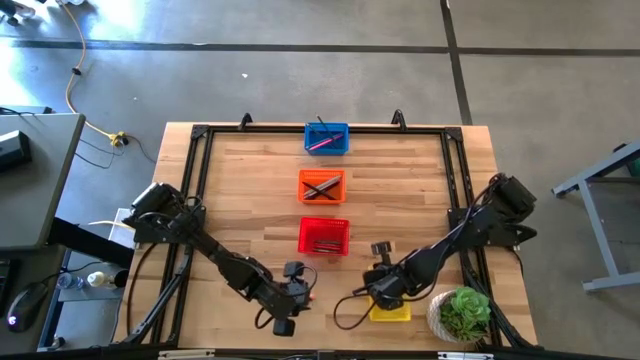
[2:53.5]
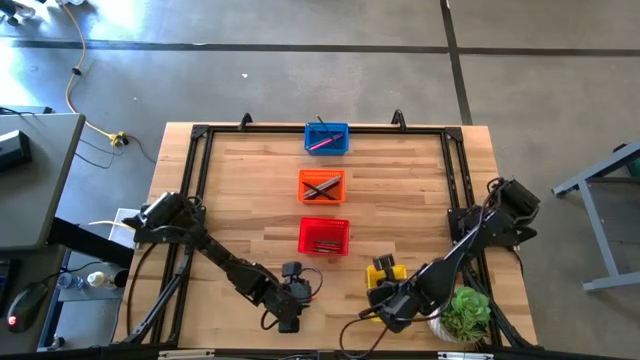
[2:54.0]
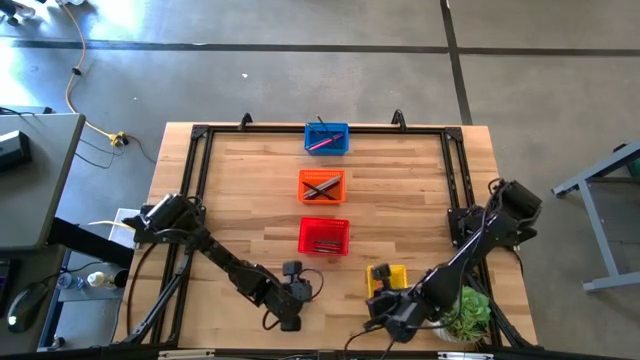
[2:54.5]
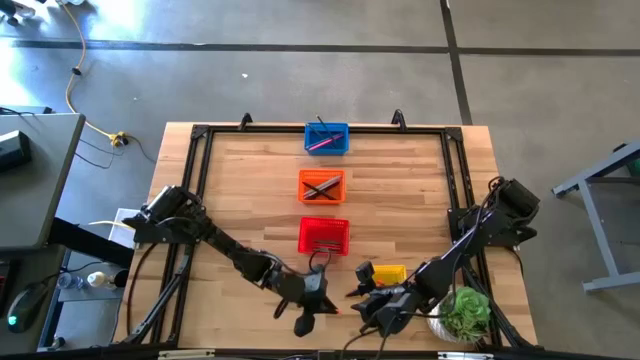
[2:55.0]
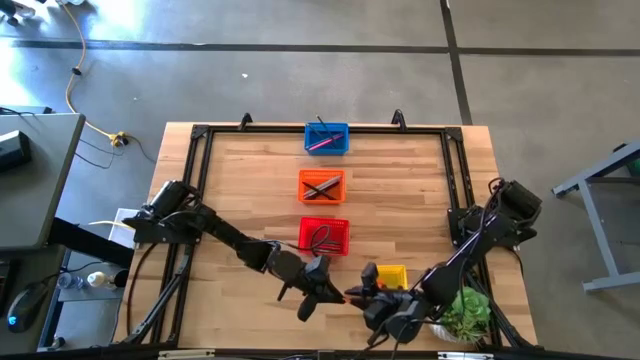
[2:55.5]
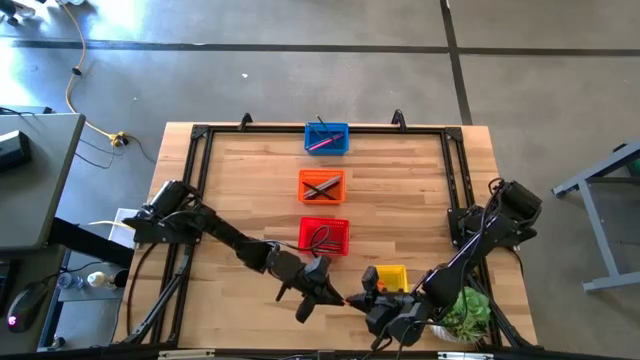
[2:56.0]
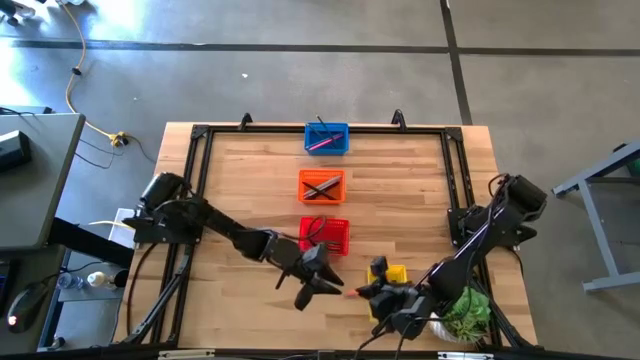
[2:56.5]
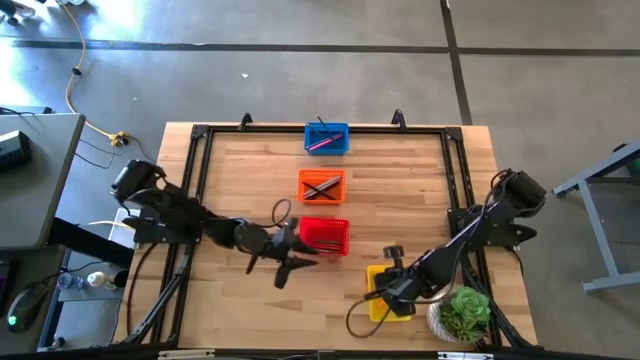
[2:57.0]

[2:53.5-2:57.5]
Task: Sort crayons/erasers/pens/pencils in bins
Put the orange eraser into the yellow bin

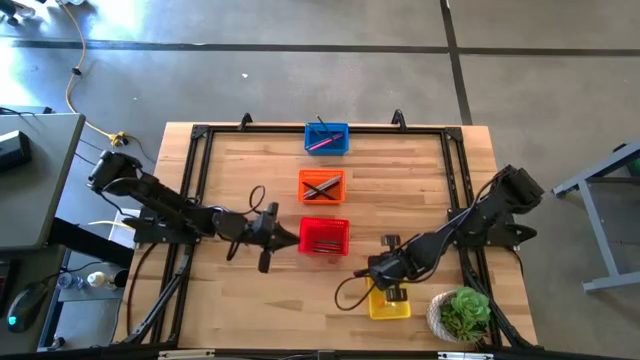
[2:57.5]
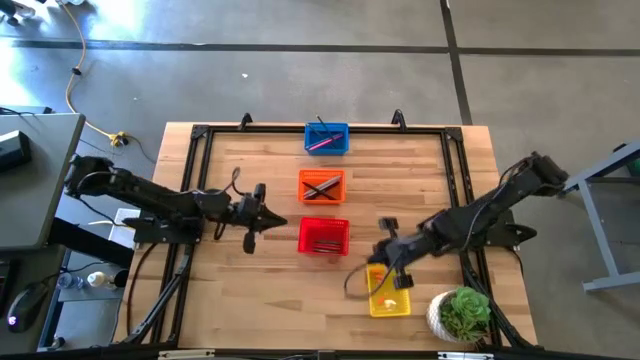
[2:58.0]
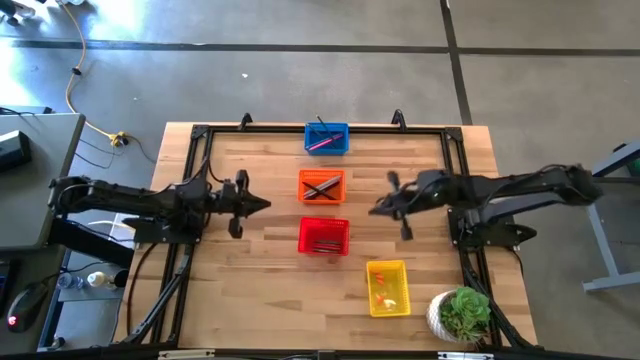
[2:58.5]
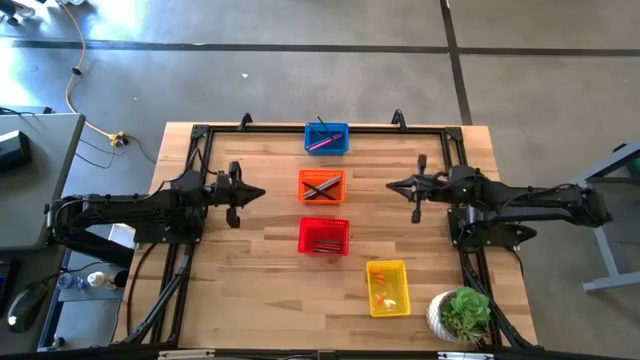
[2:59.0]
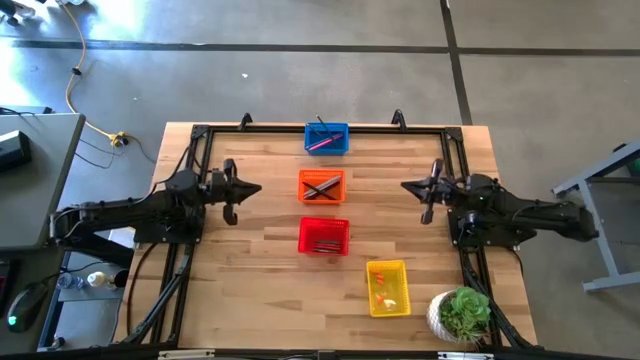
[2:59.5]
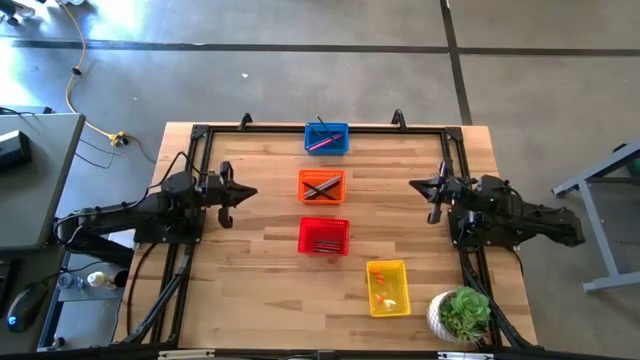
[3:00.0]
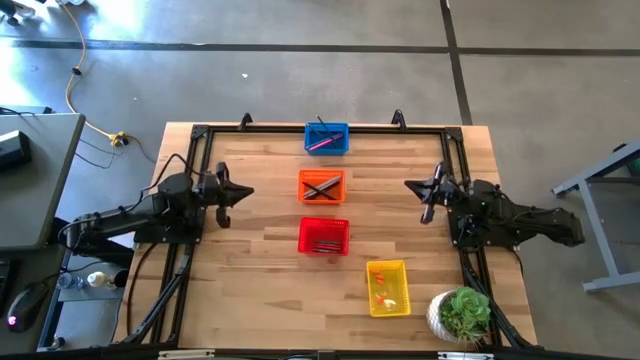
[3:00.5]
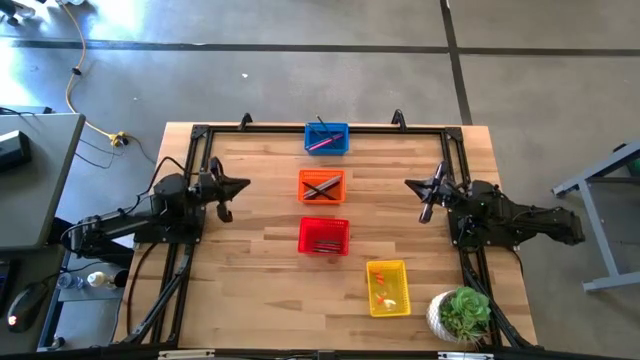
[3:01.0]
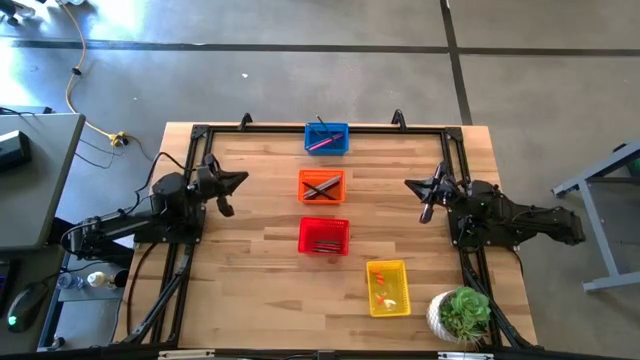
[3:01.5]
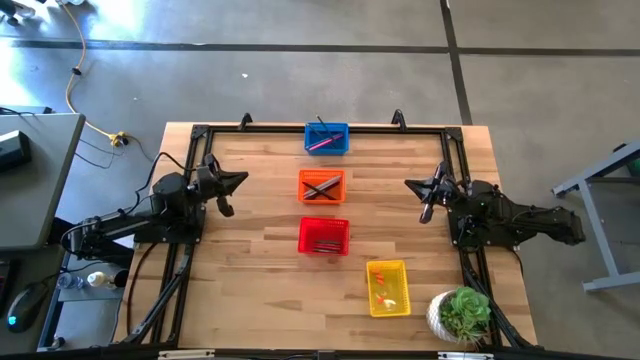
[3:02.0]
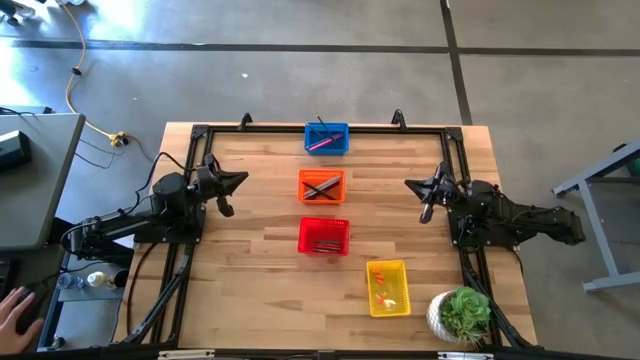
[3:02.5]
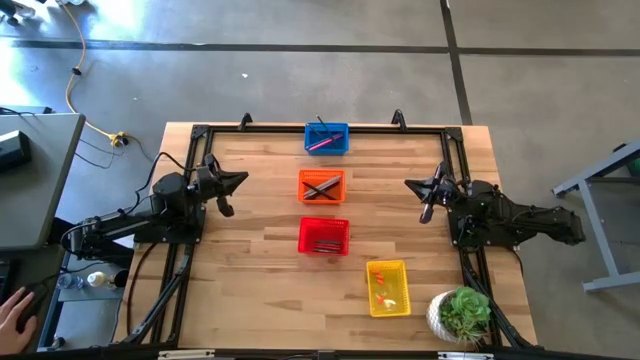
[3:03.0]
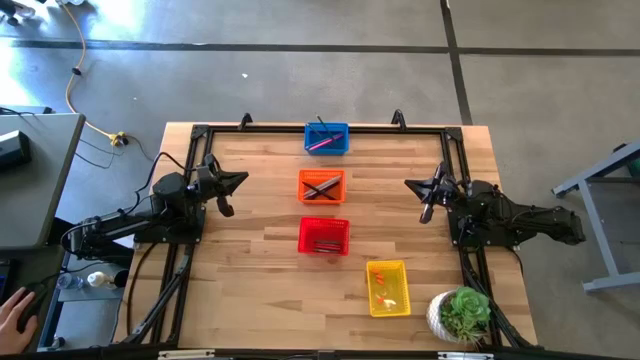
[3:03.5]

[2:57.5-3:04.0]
Return to Home Position

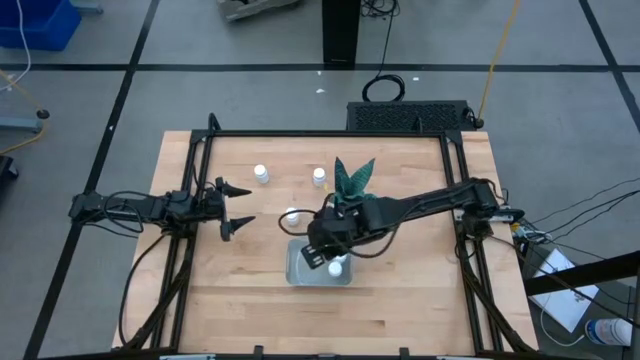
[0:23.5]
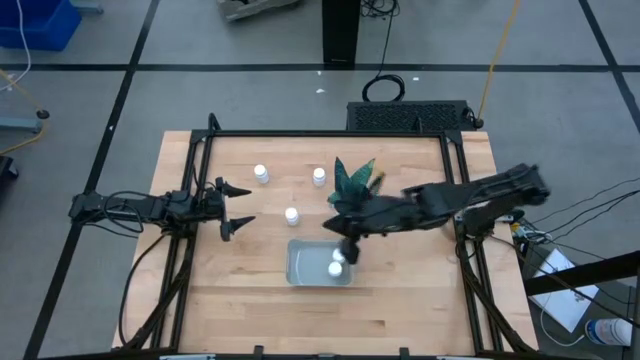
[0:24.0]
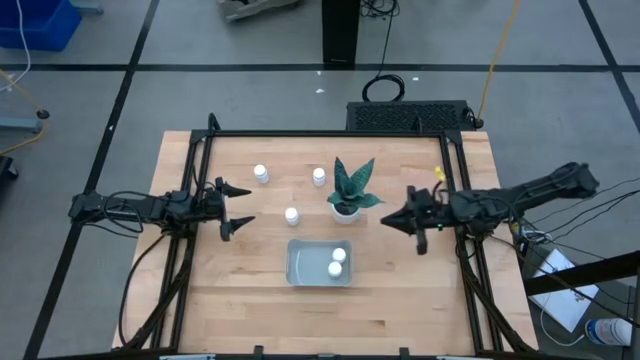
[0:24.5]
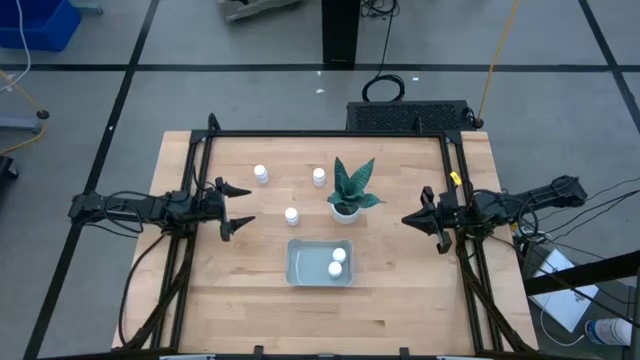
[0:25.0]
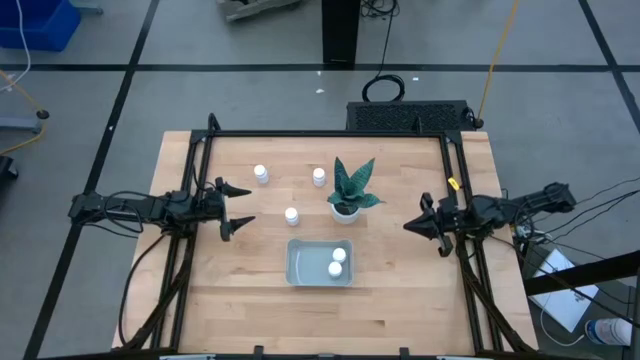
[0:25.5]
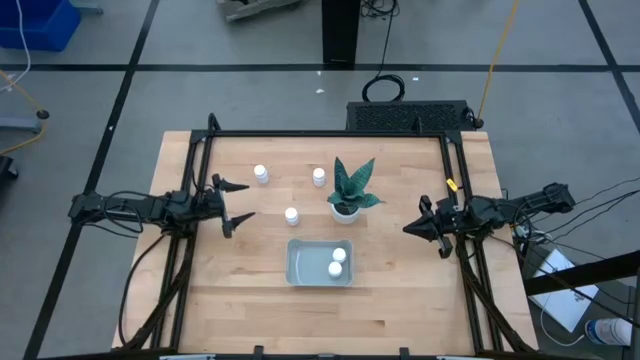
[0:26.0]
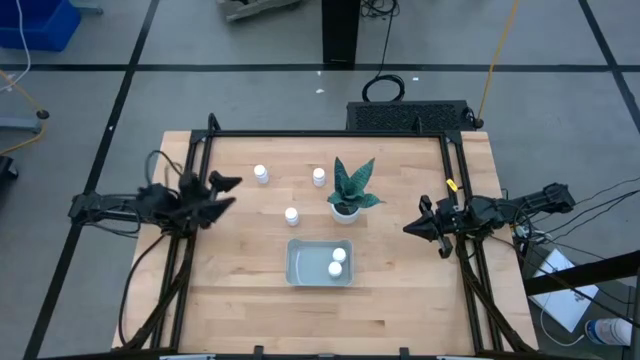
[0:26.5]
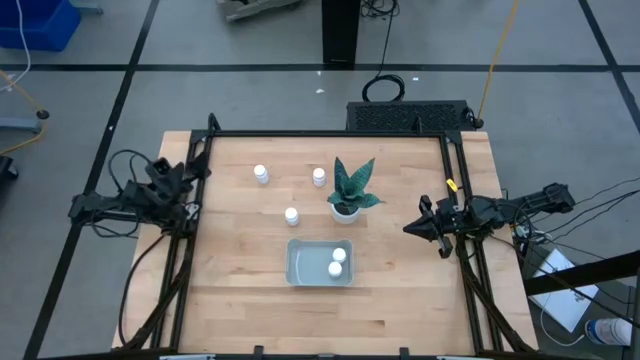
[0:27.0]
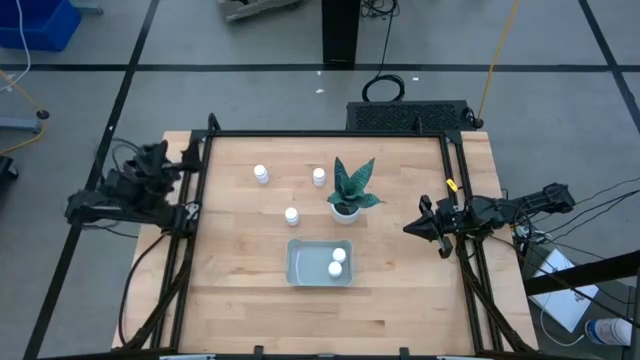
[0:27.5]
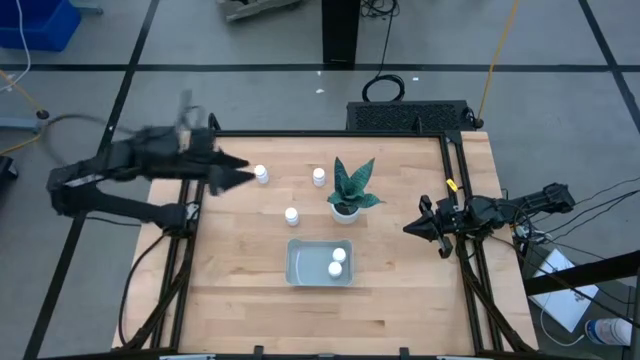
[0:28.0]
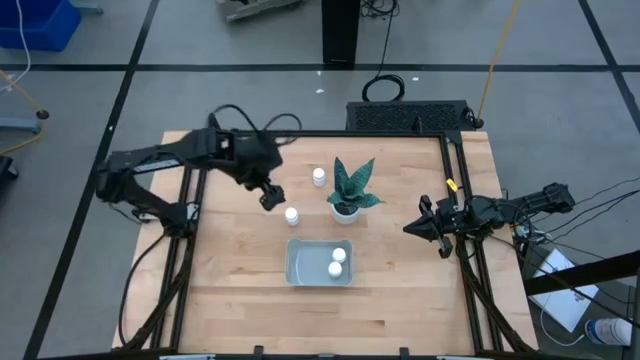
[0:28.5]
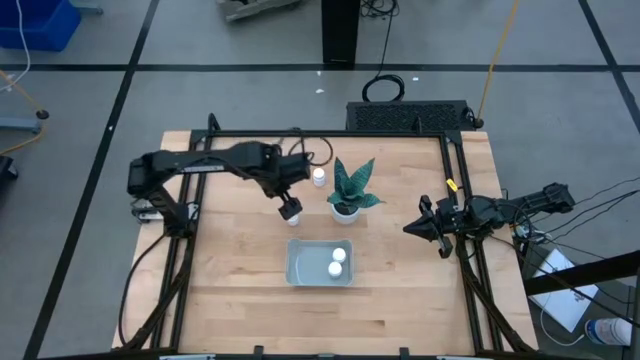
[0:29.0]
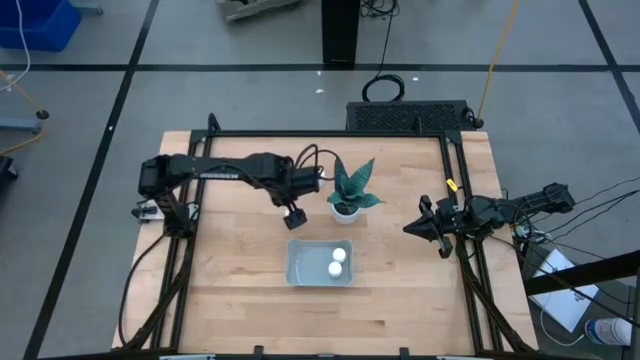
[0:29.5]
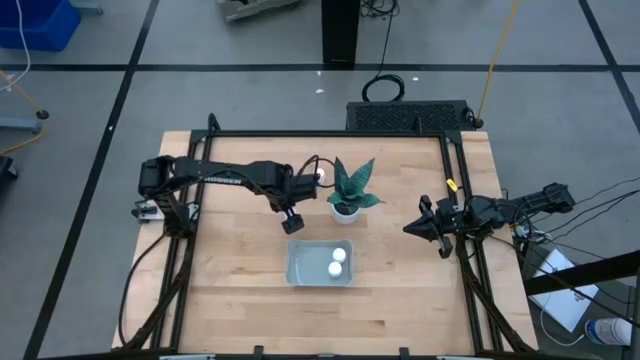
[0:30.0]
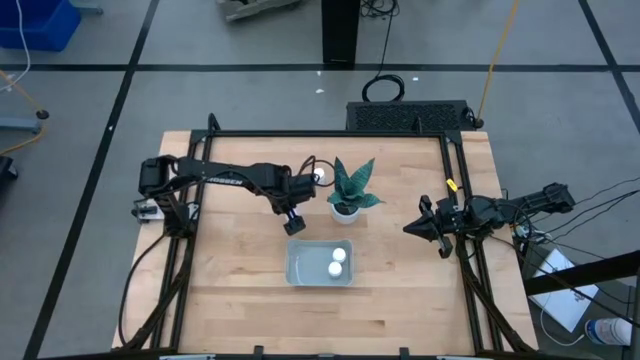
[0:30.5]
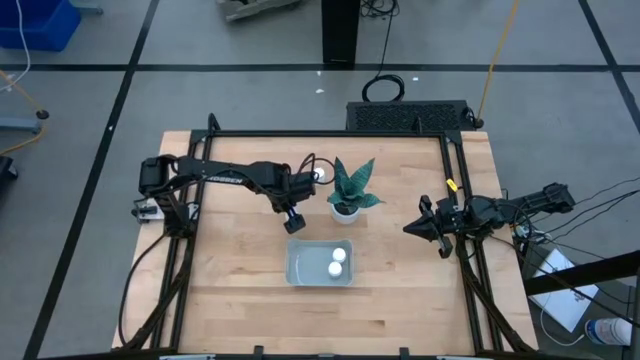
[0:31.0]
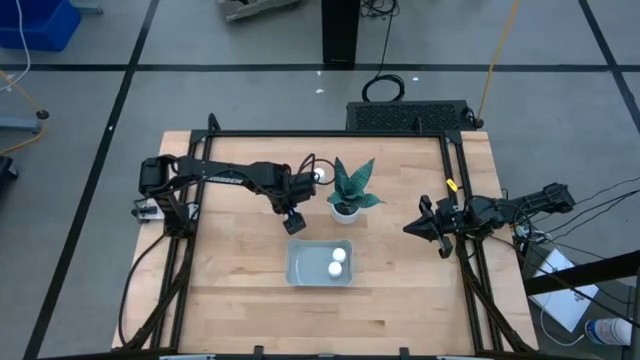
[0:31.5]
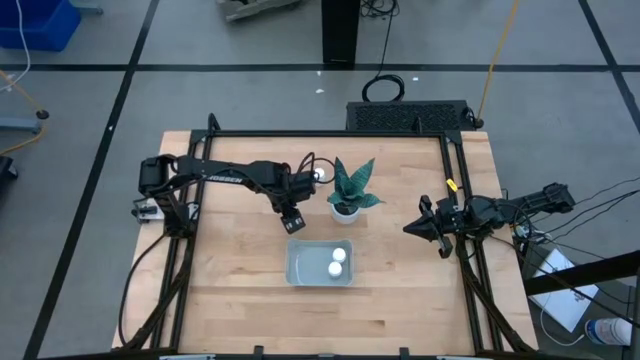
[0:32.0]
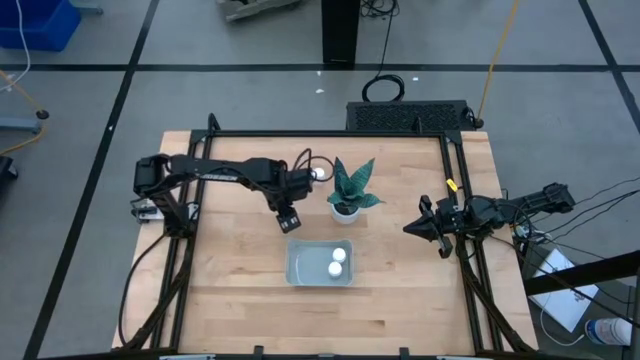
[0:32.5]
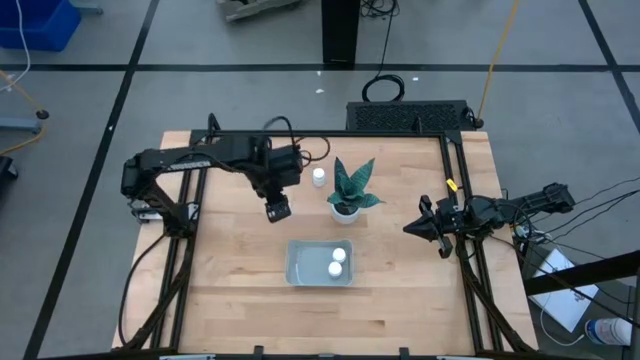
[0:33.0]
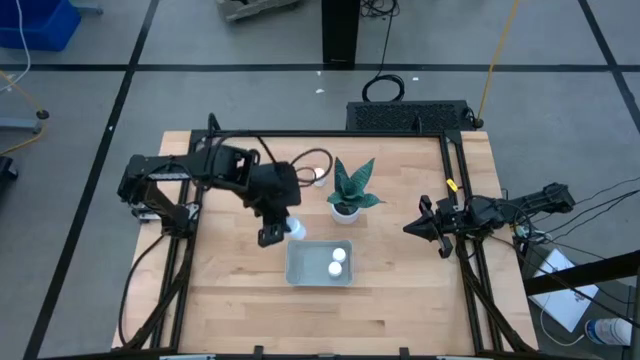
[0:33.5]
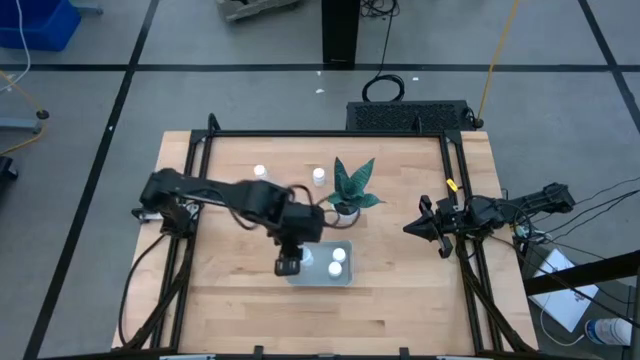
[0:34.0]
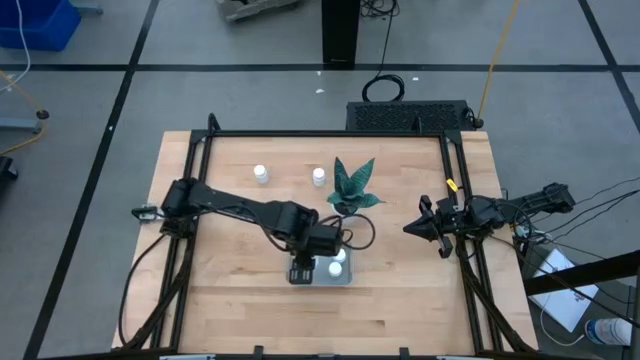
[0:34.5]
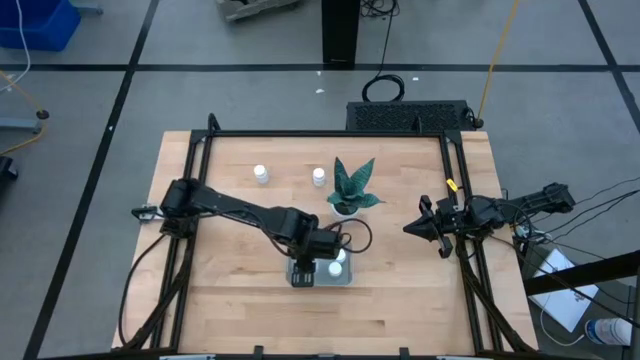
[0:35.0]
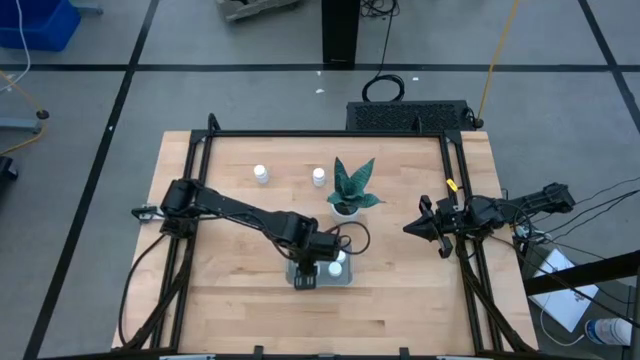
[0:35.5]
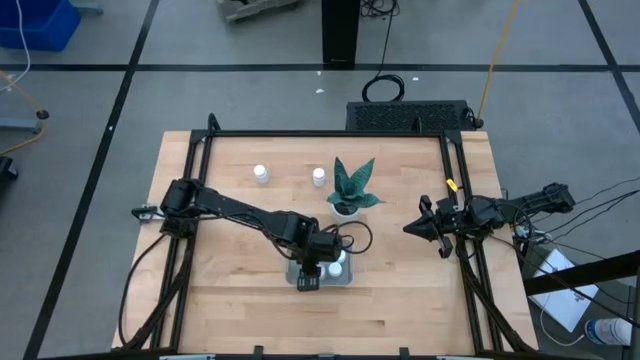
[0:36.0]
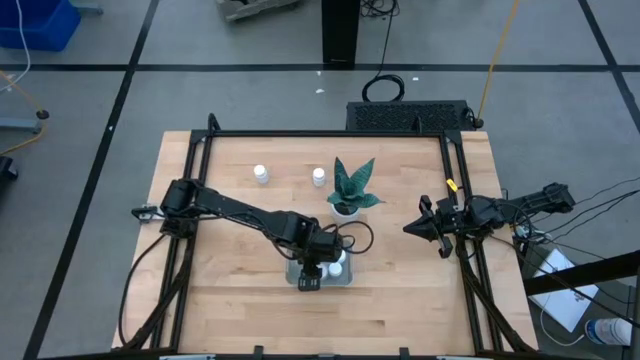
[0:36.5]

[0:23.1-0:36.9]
Task: Pick and place pill bottles into a basket
Put the white pill bottle into the white bin
